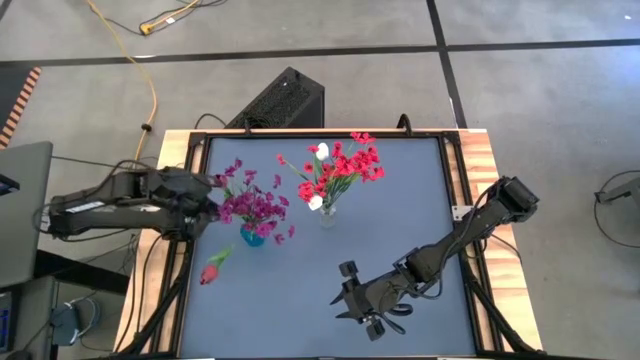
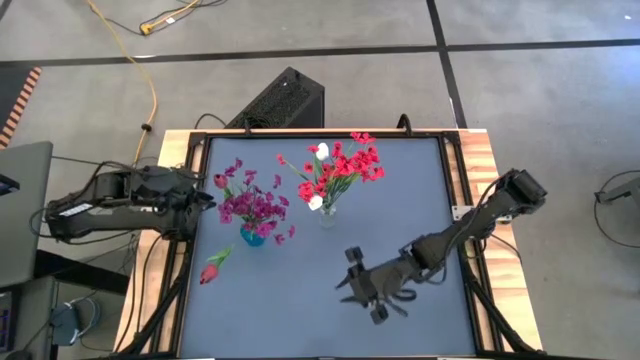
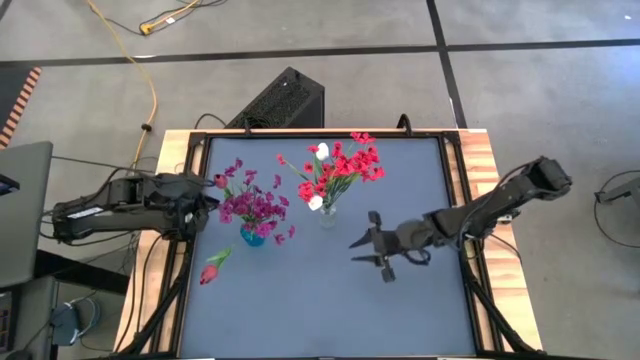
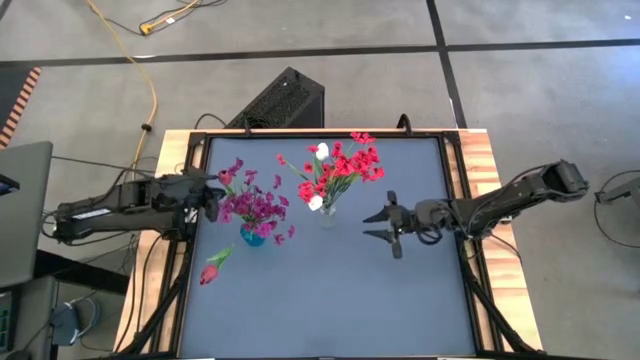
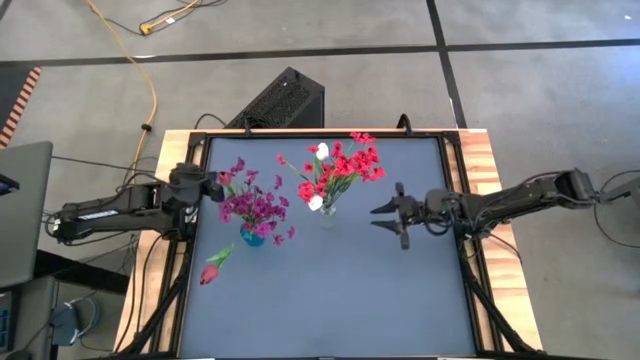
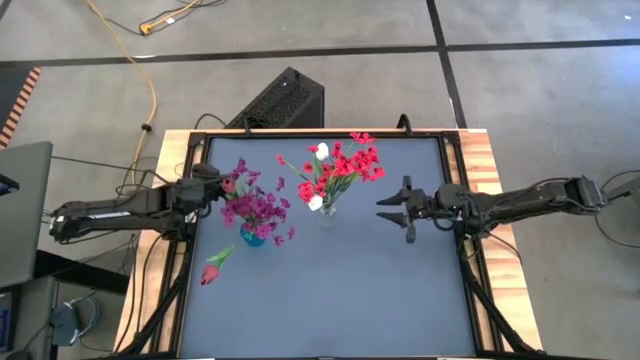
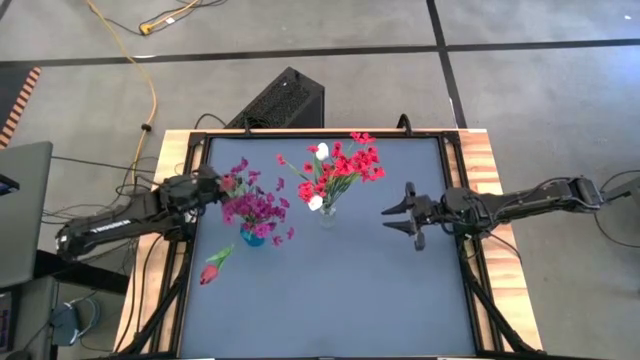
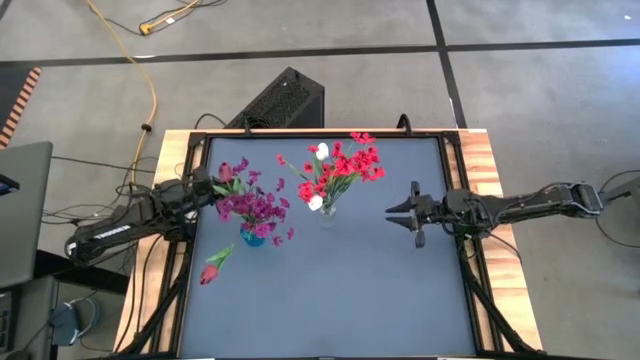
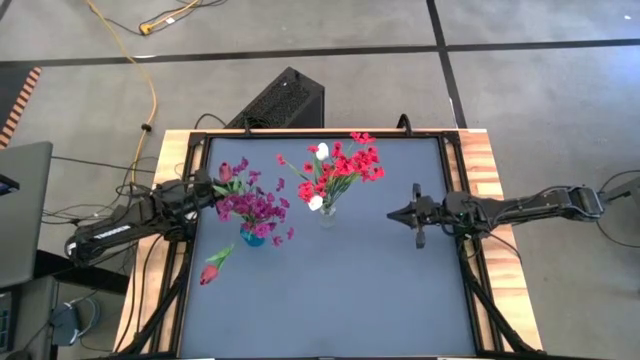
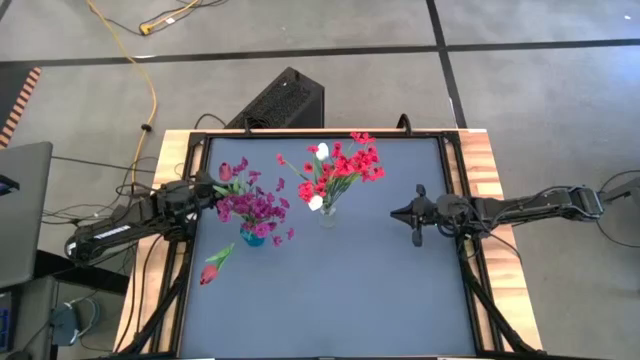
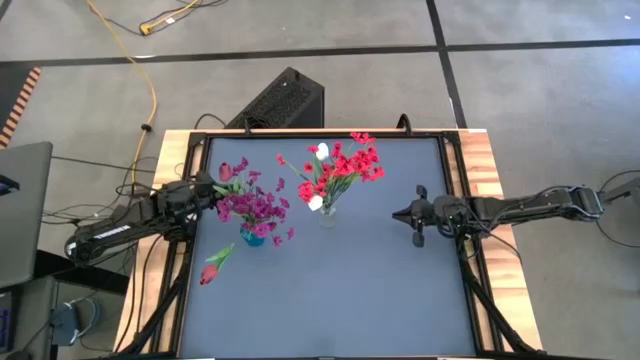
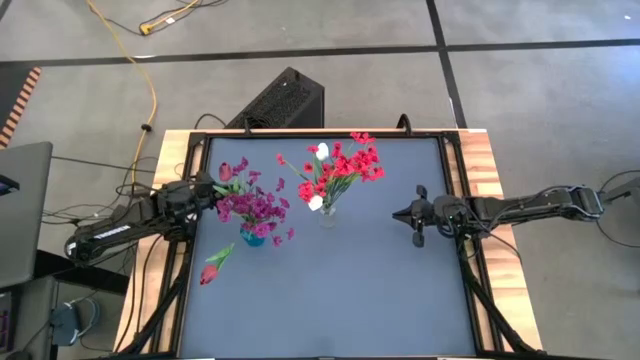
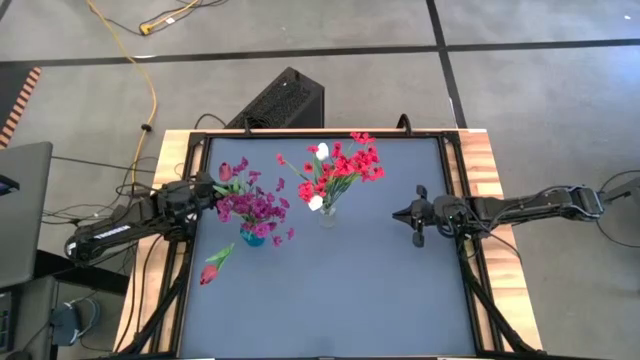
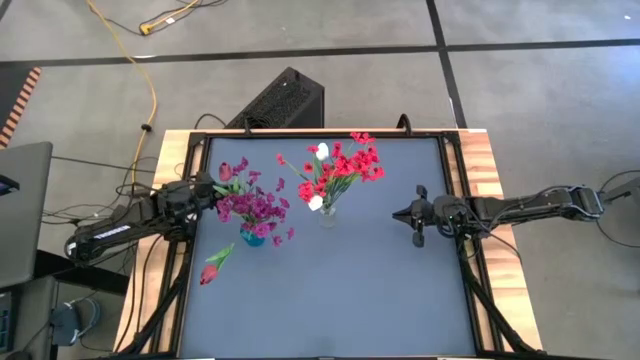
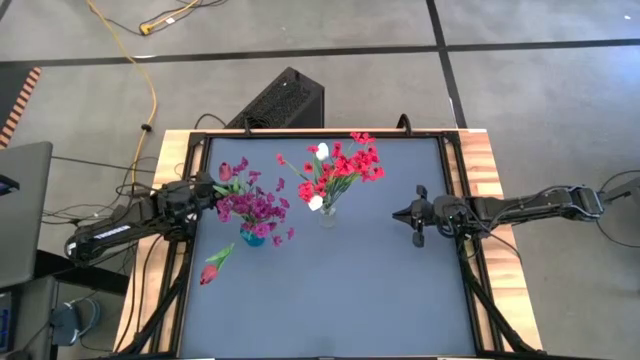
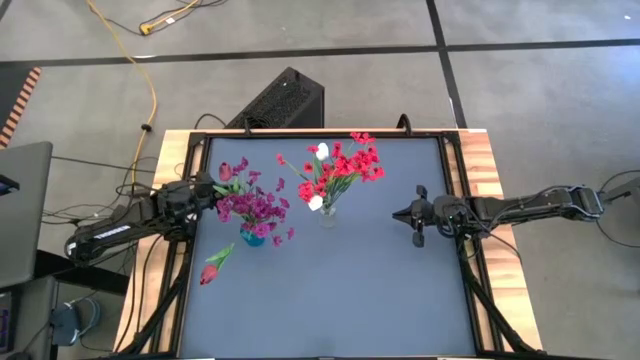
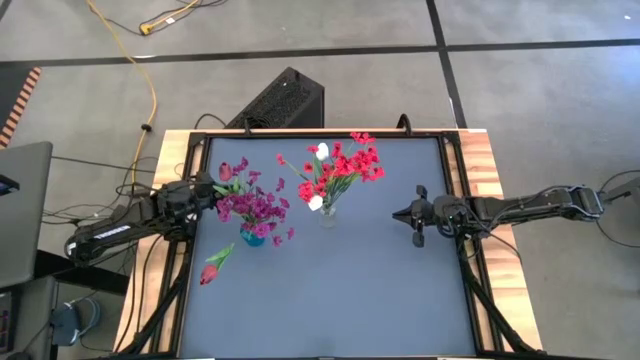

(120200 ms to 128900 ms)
Task: Sort flowers into vase by color
Return to Home Position

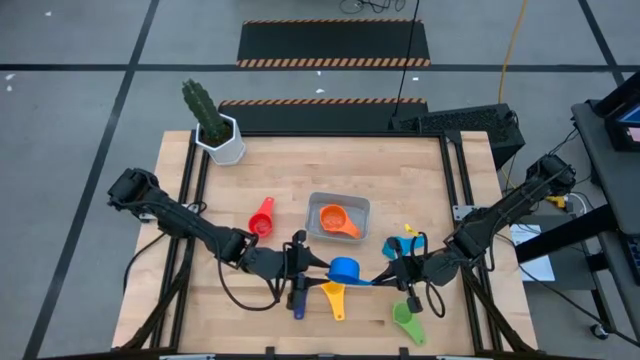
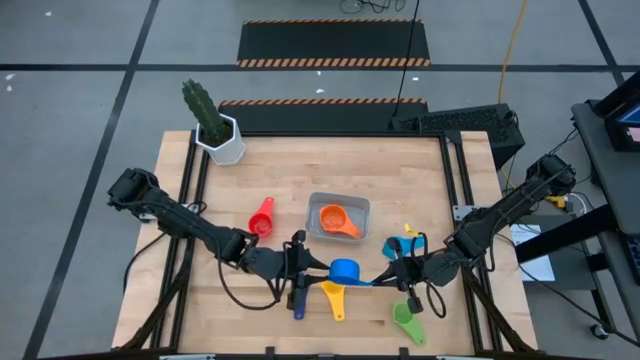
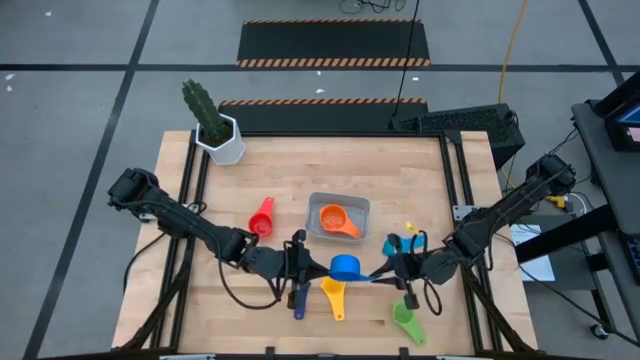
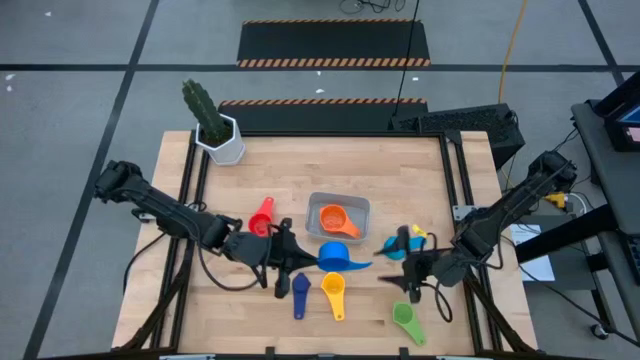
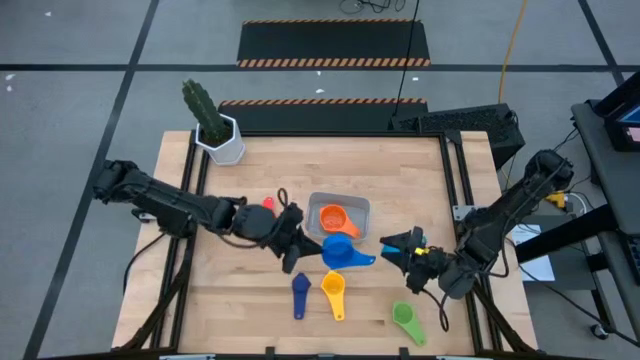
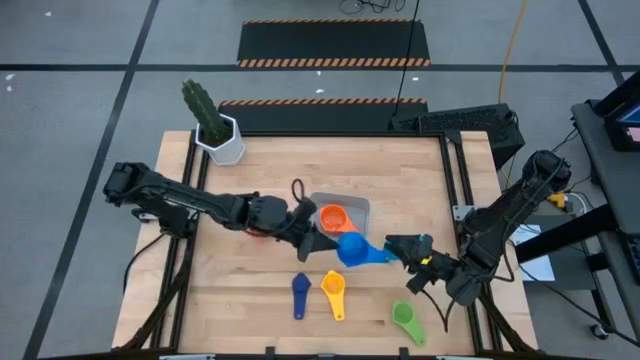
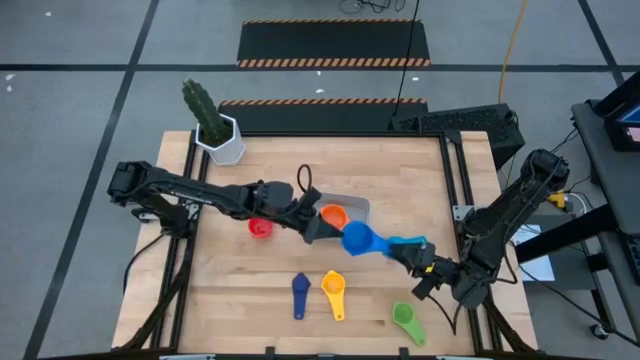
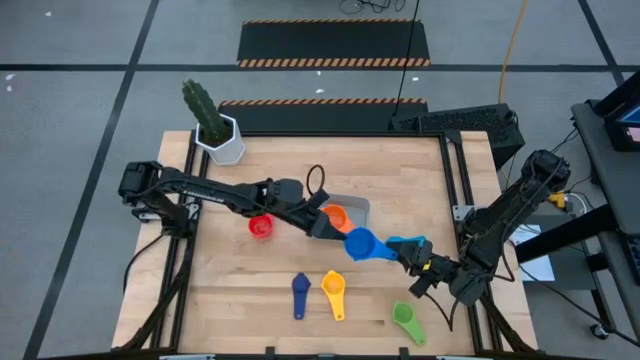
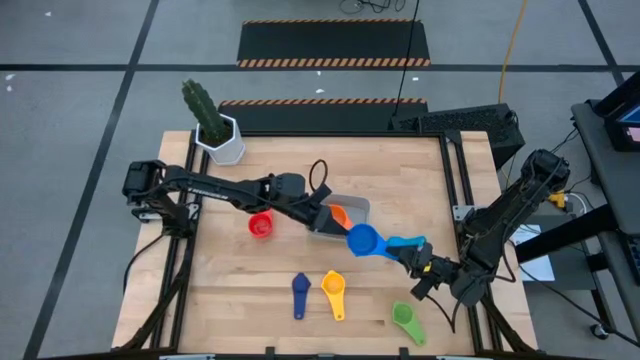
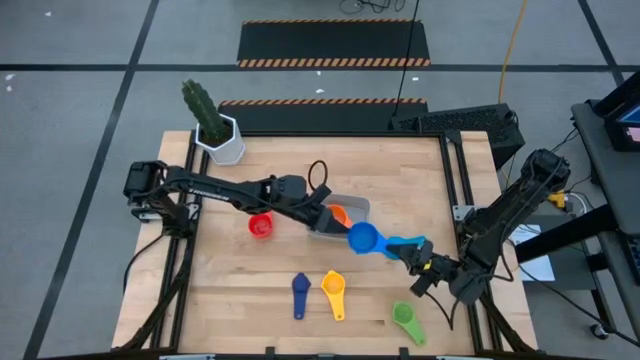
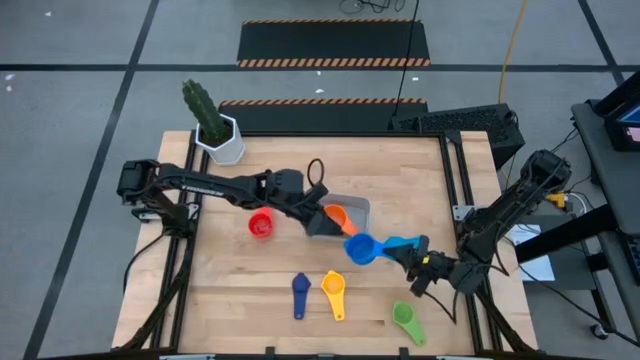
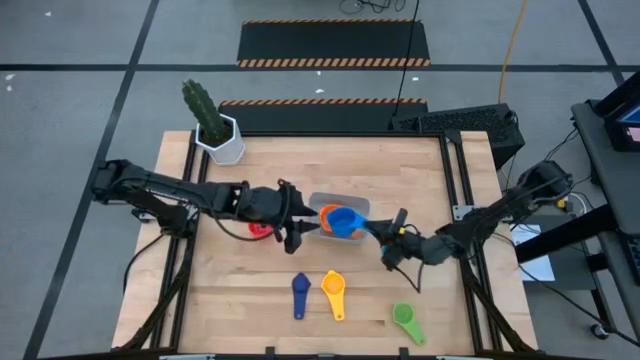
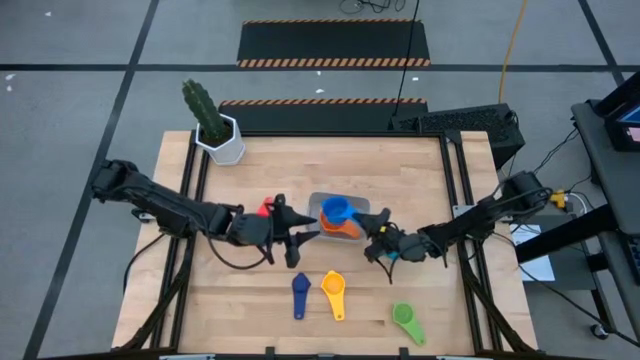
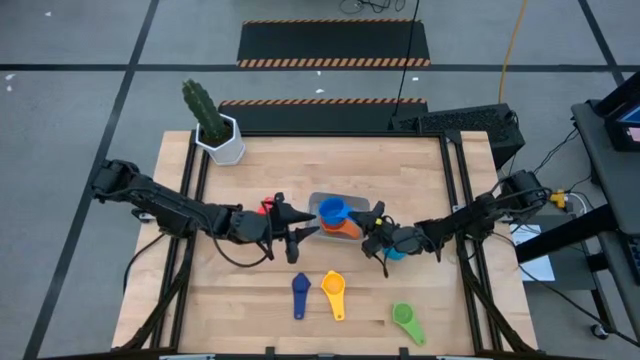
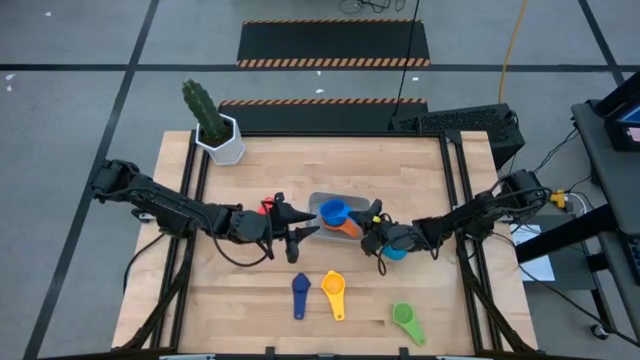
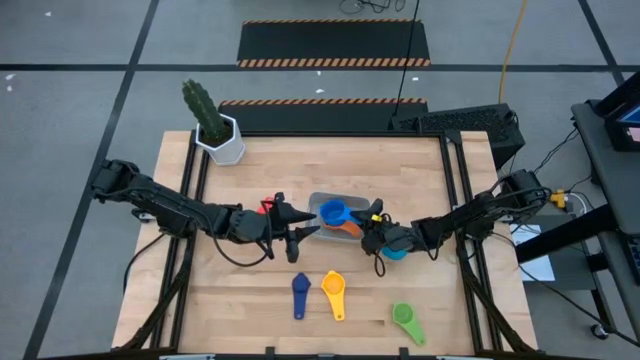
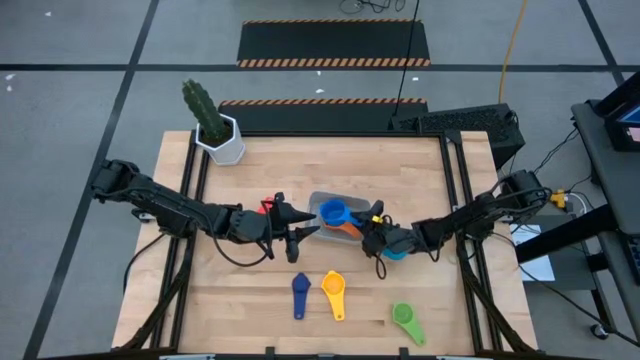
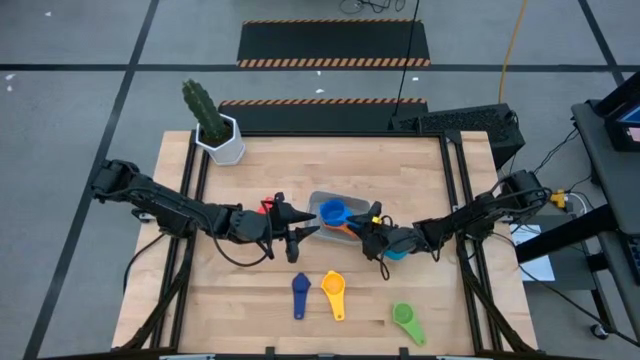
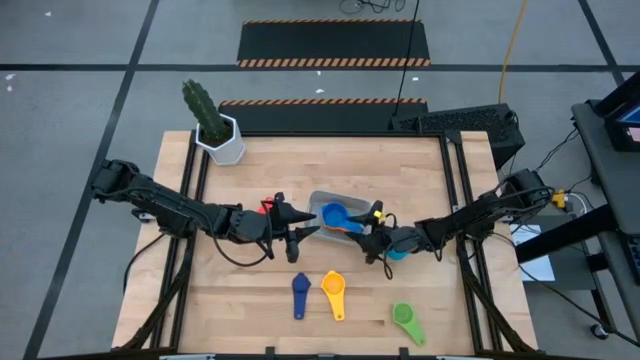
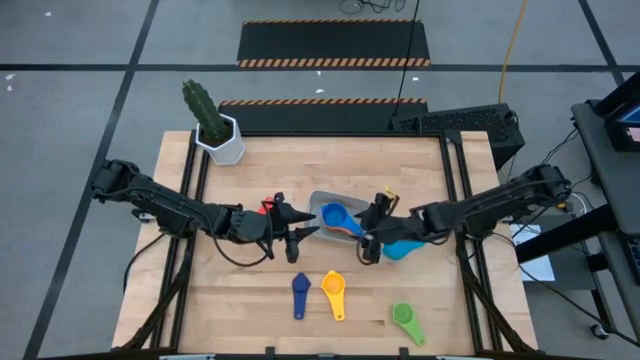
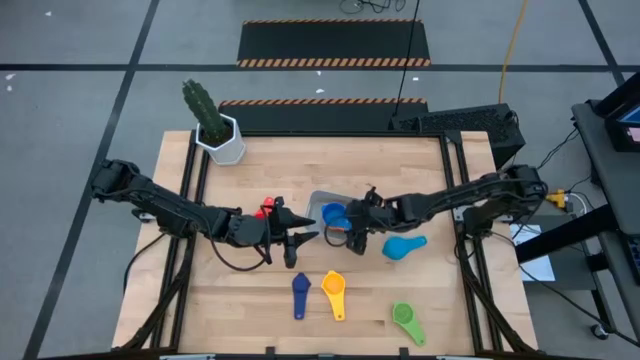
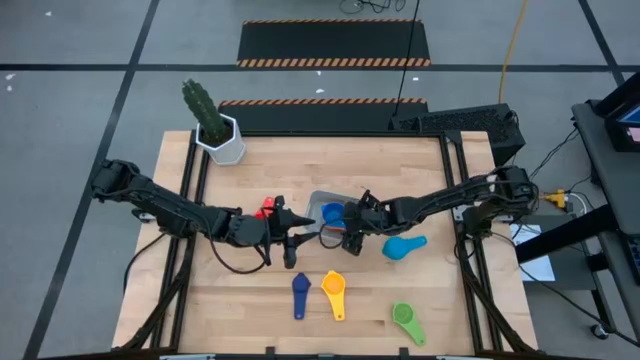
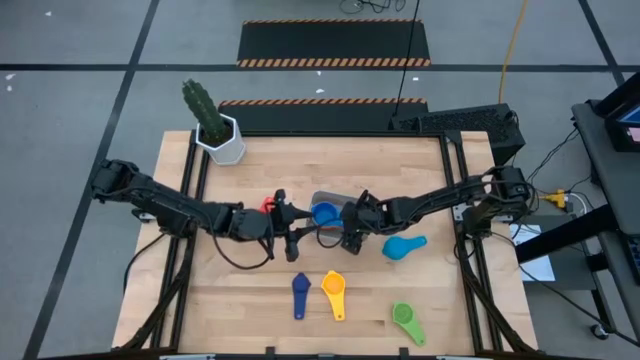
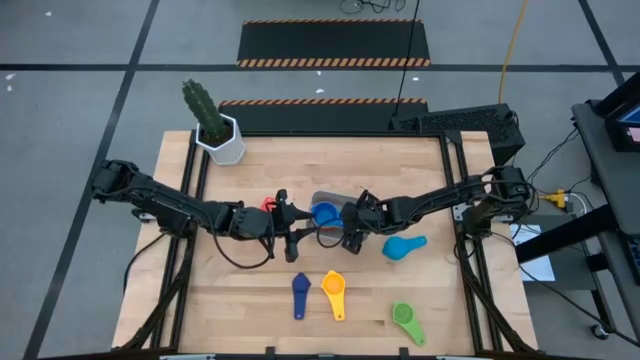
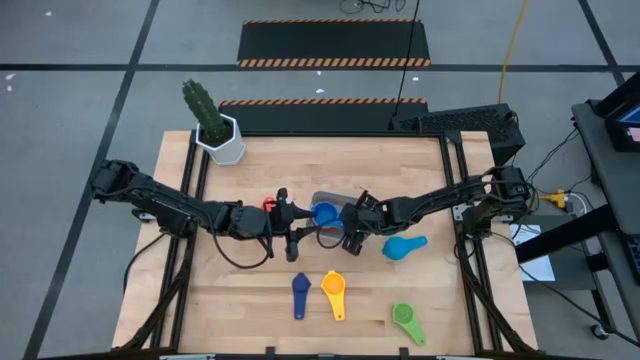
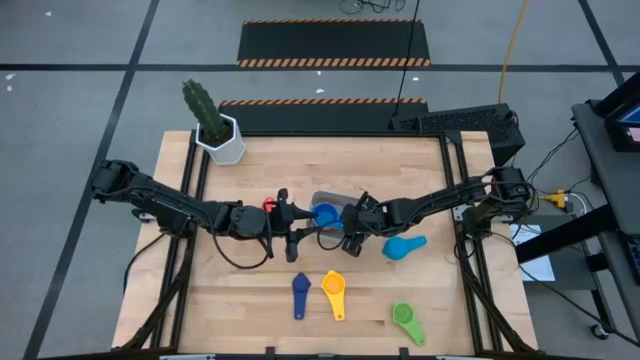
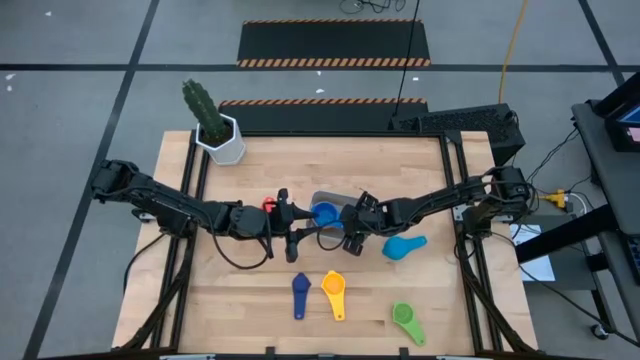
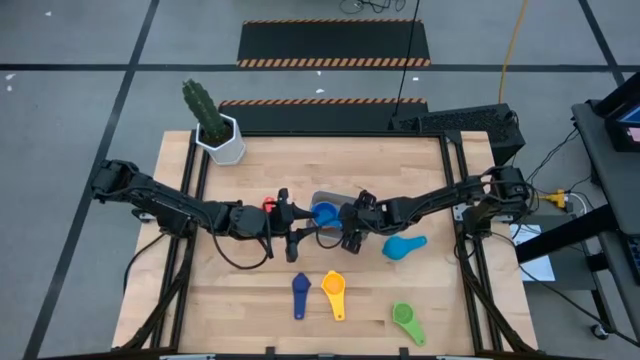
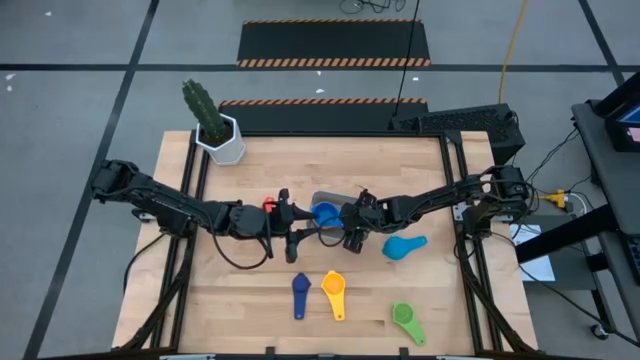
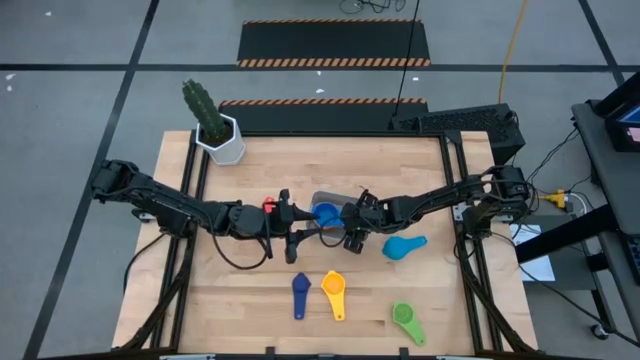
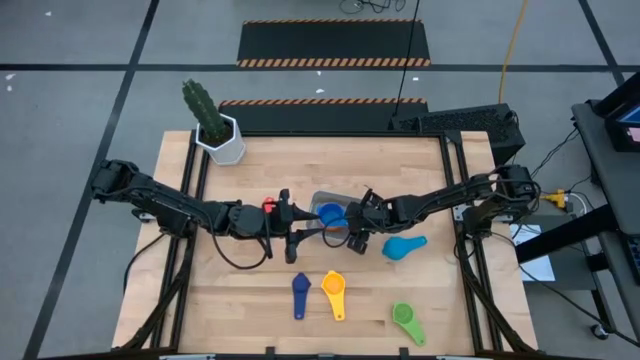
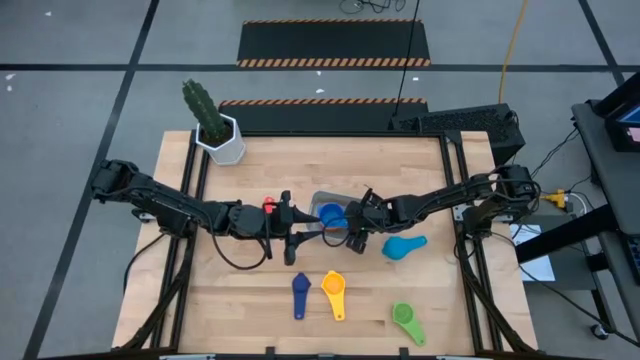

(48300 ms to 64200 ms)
Task: Nest measuring cups in basket
Stack the blue measuring cup into the orange measuring cup
